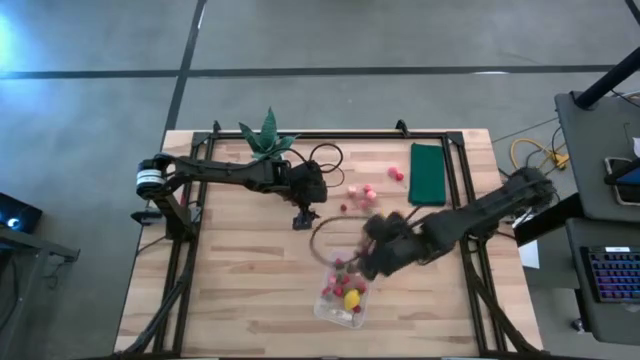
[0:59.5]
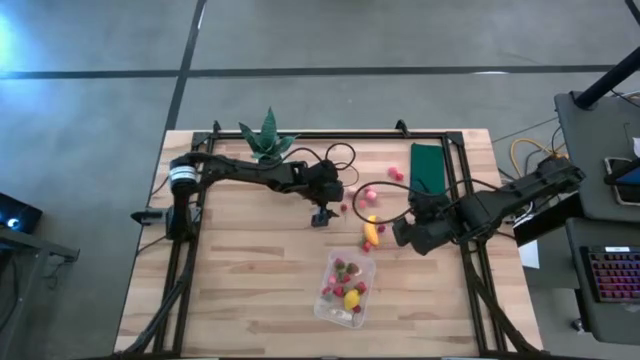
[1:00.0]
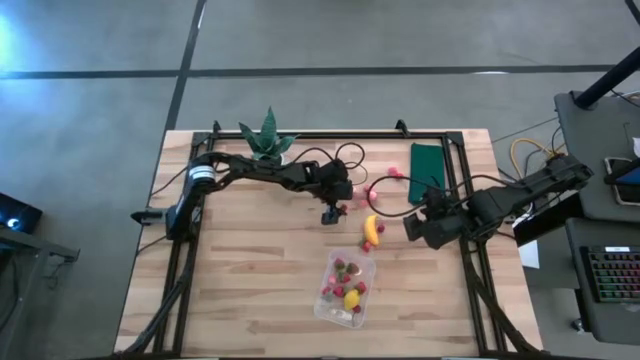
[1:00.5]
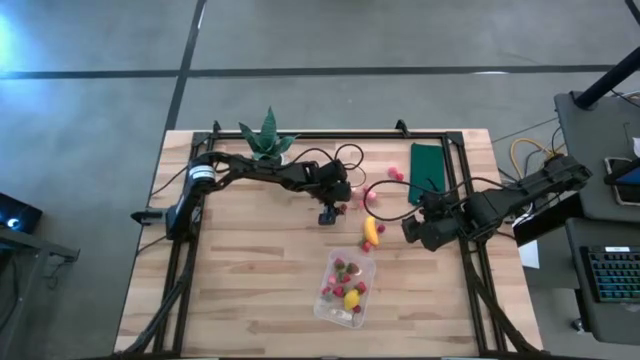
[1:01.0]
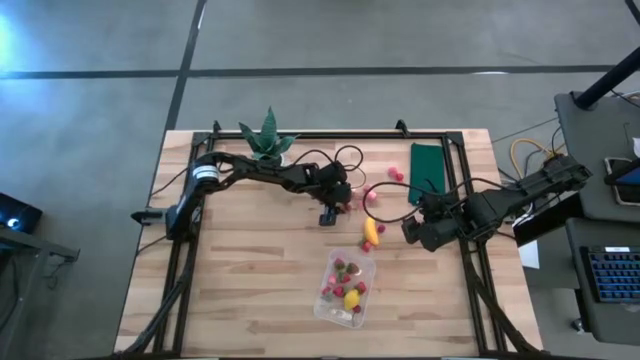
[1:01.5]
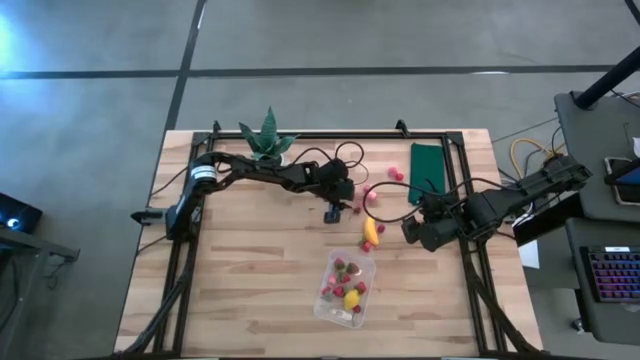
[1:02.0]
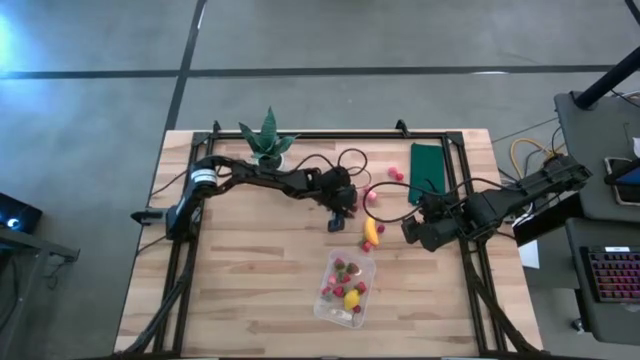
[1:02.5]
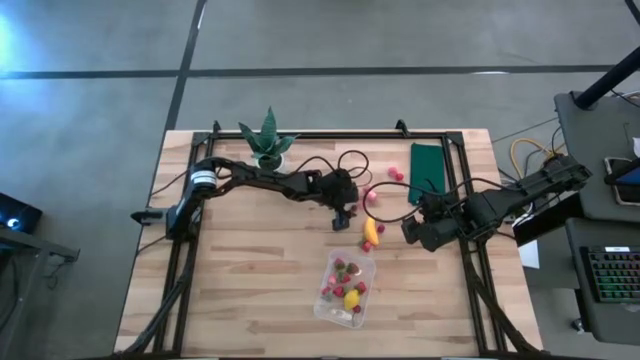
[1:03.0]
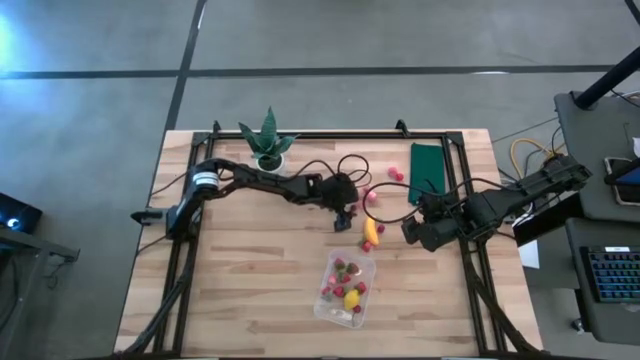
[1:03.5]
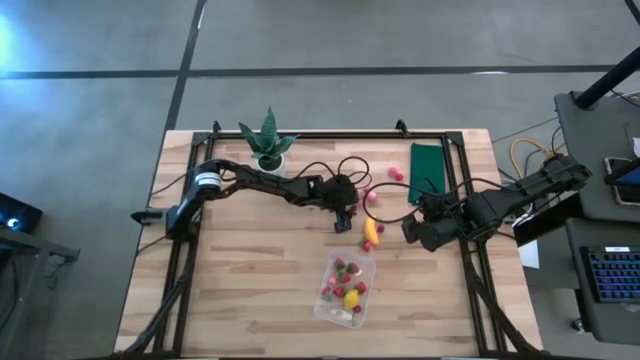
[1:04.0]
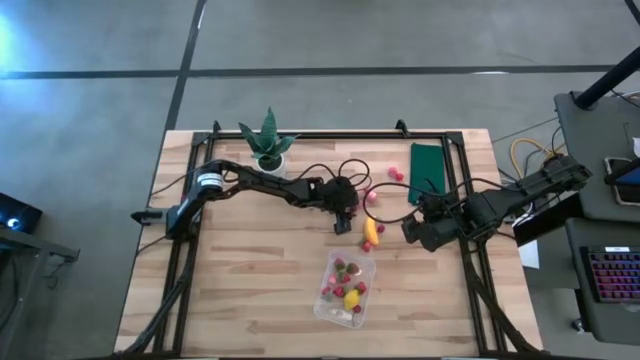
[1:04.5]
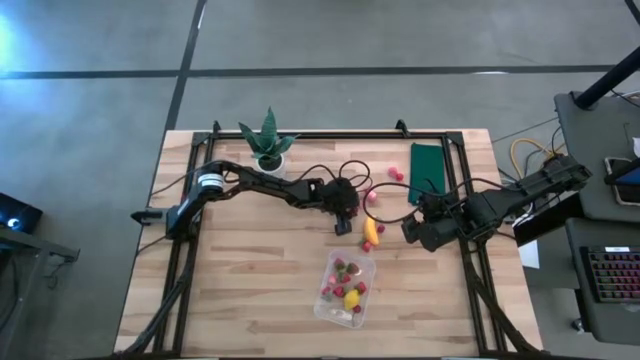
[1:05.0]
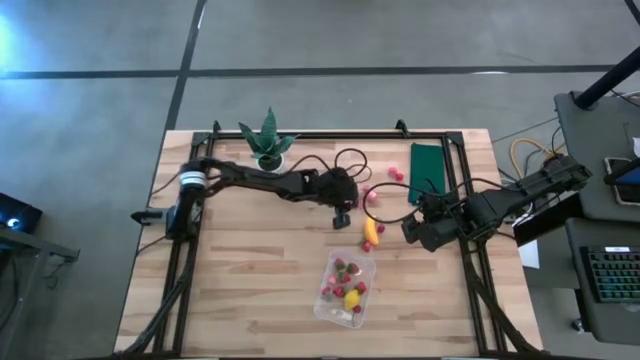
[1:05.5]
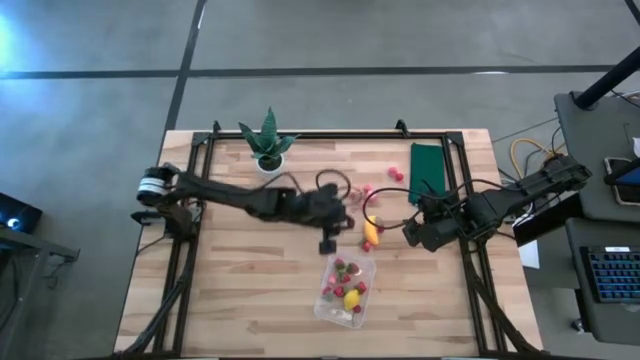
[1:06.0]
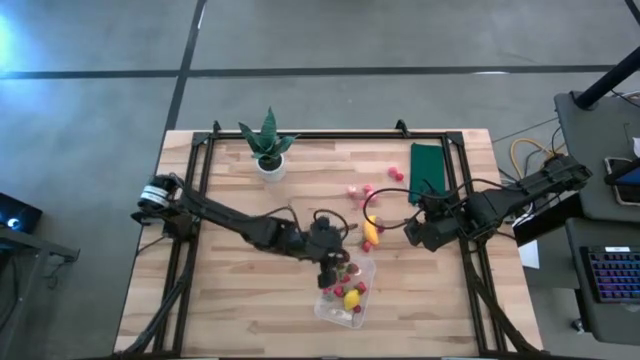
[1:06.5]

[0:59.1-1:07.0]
Task: Pick and placing Produce into tupperware
Put the cherry into the transparent bin

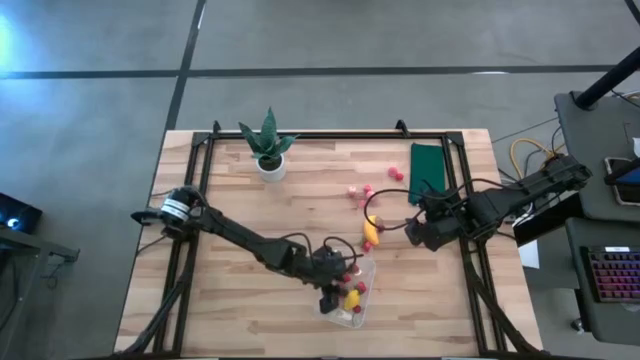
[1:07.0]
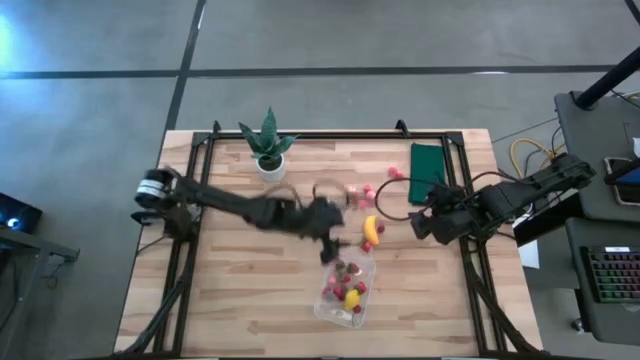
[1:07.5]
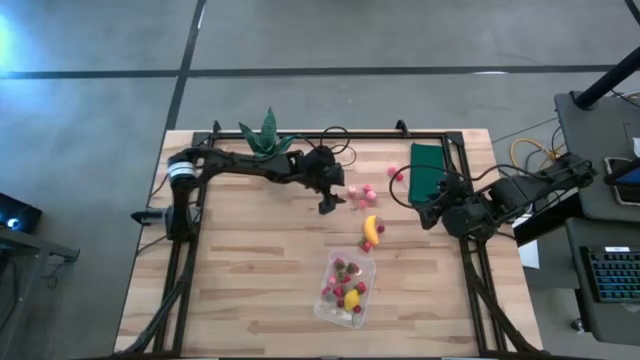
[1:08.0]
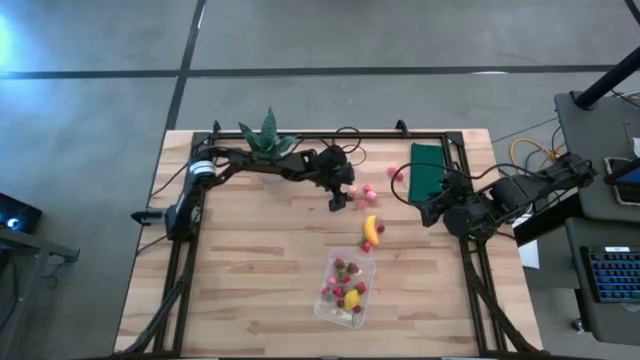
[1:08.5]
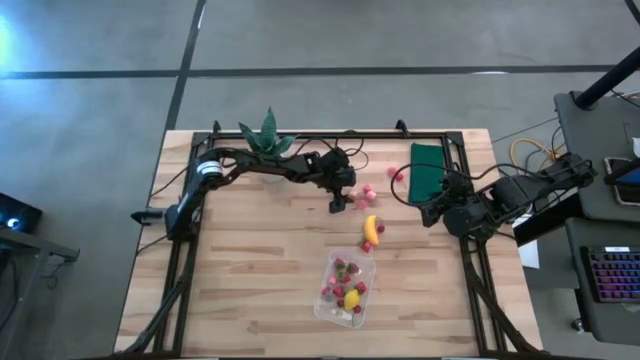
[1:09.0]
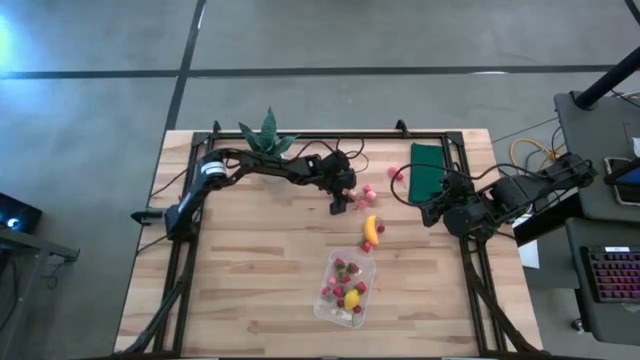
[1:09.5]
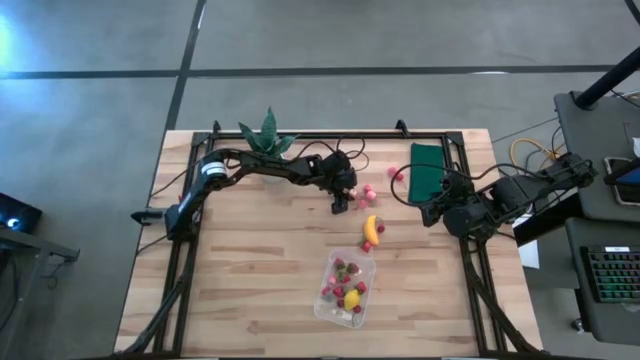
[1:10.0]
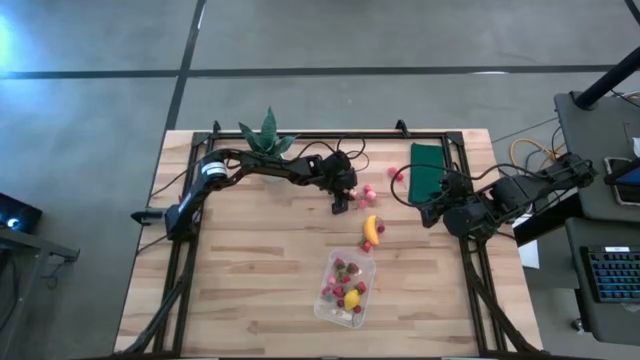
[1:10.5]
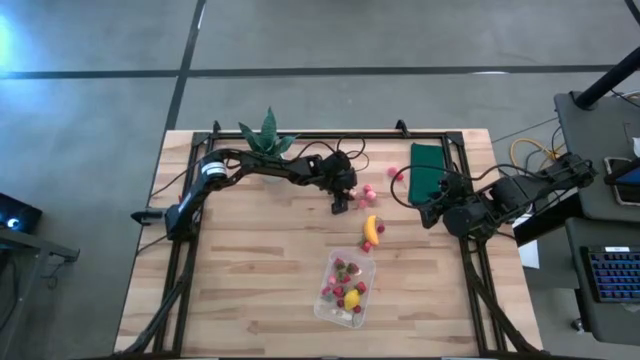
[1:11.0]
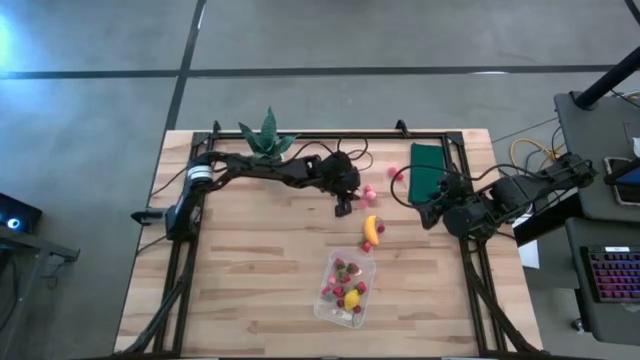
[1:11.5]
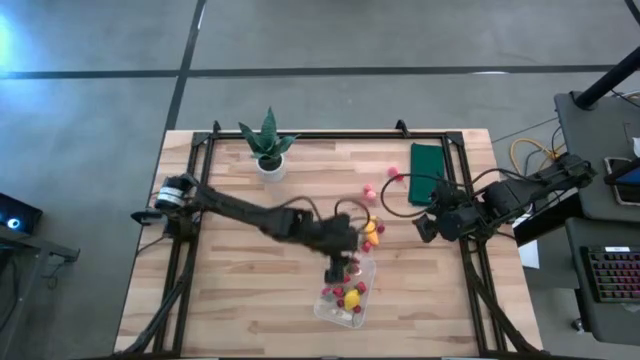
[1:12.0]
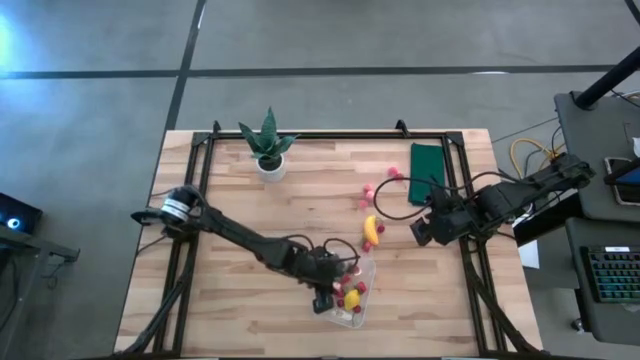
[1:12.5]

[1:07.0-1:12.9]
Put the peach into the transparent bin

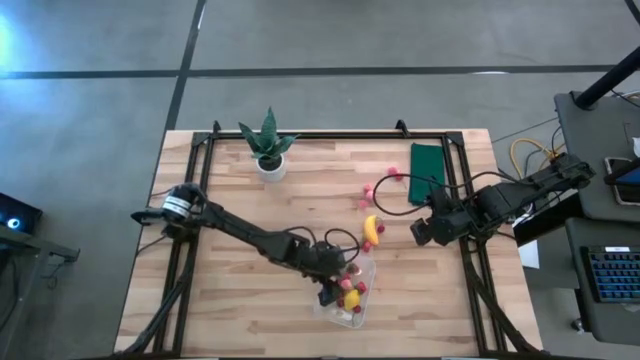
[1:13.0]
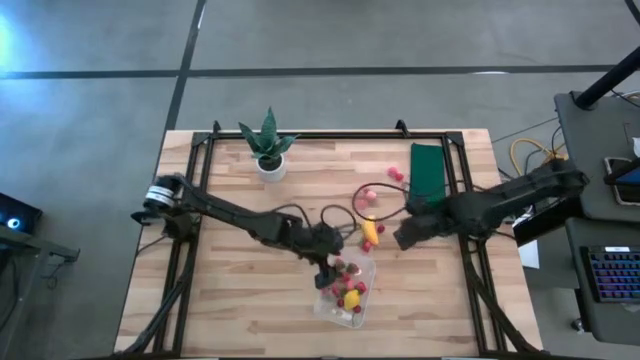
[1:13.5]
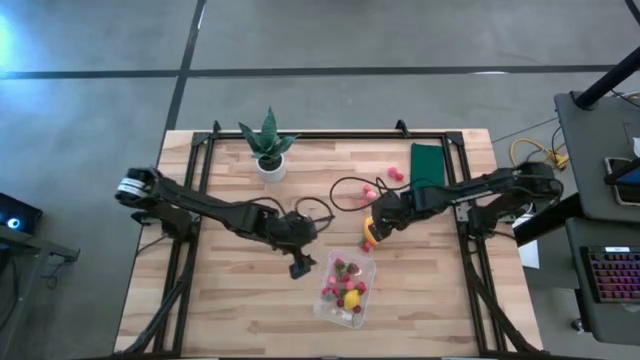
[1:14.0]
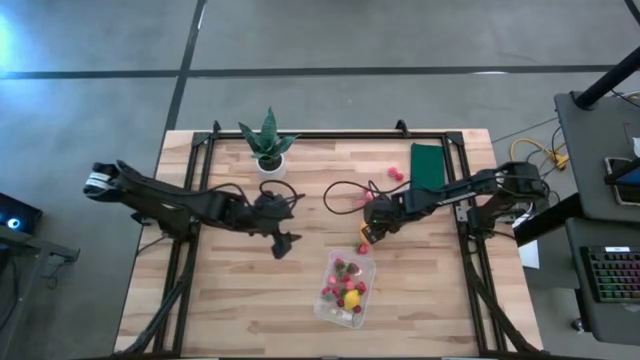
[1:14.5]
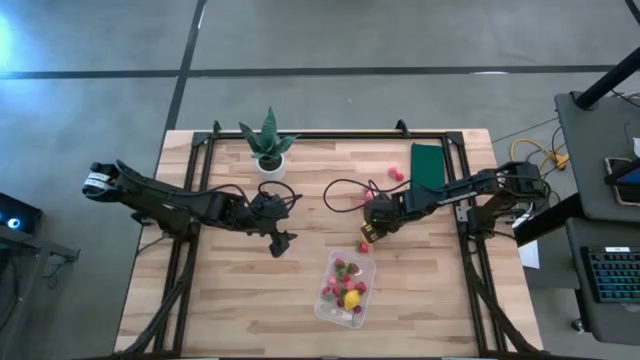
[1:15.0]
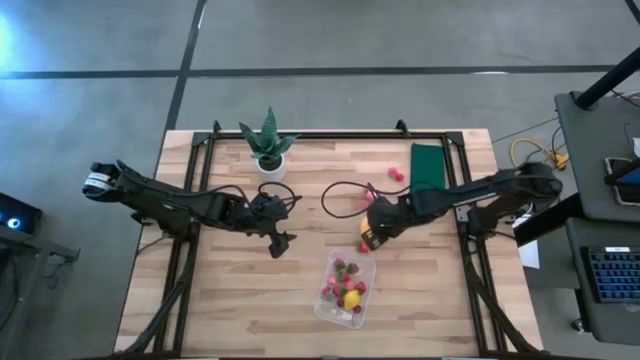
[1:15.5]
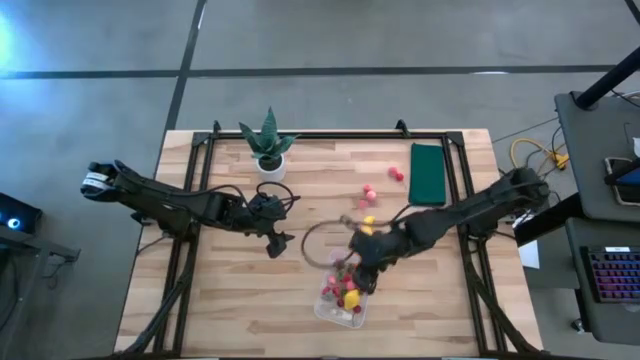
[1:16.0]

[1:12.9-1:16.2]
Put the cherry into the transparent bin

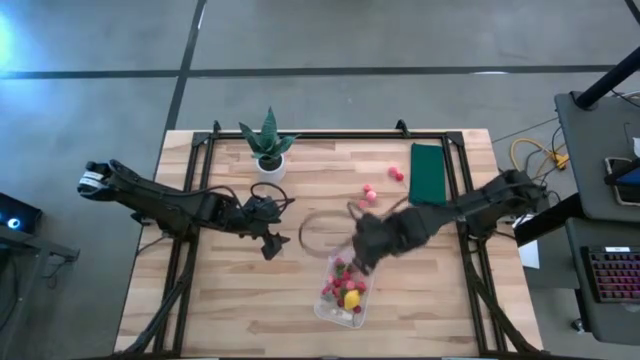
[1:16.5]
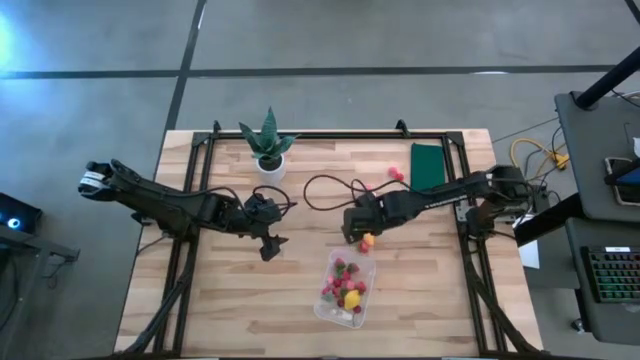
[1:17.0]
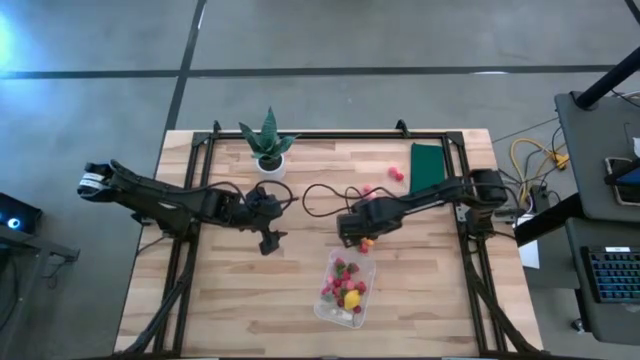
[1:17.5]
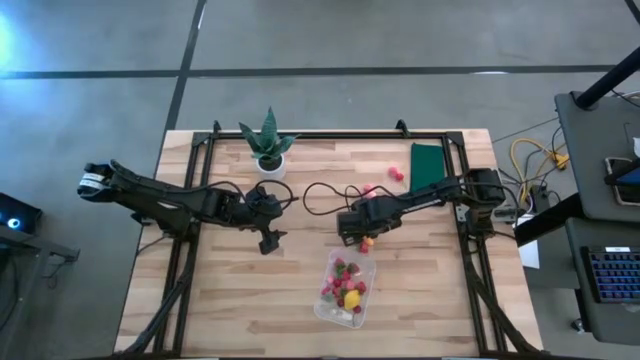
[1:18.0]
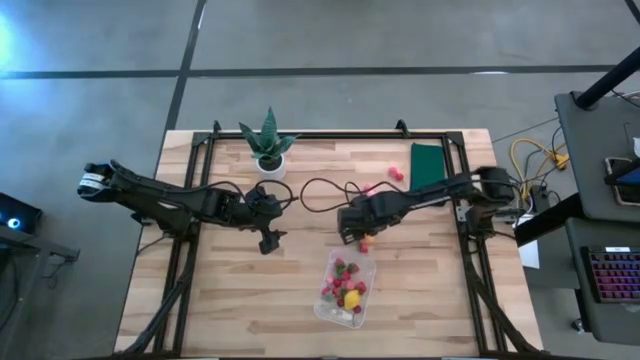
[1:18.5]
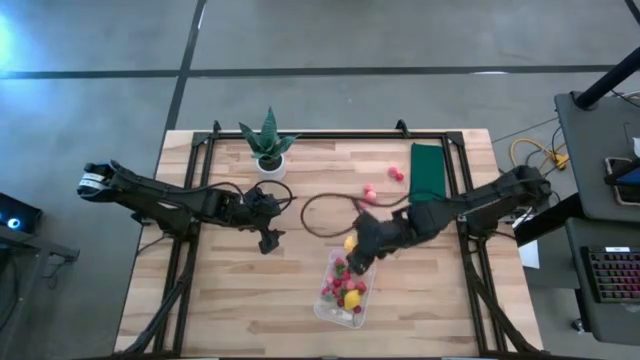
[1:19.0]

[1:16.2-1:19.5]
Put the banana into the transparent bin
